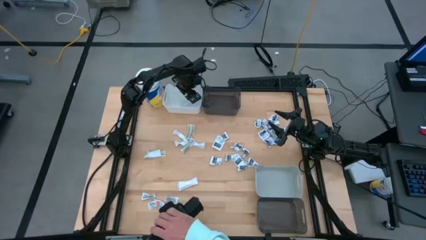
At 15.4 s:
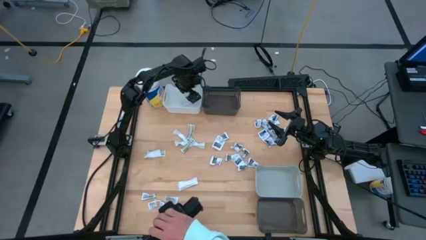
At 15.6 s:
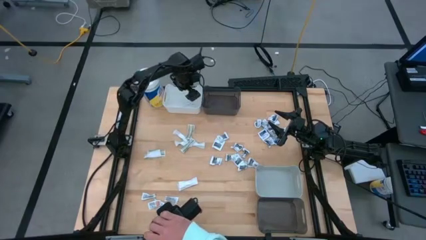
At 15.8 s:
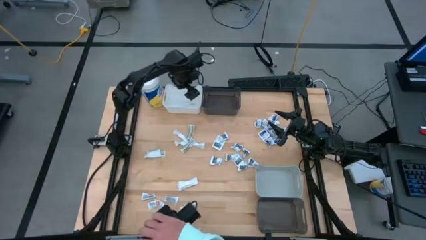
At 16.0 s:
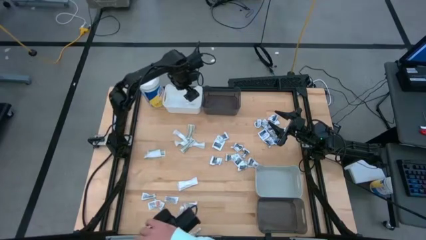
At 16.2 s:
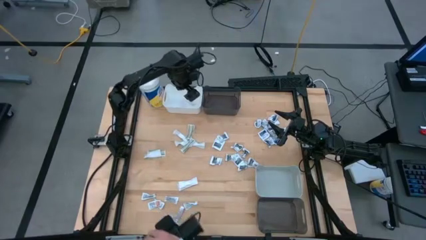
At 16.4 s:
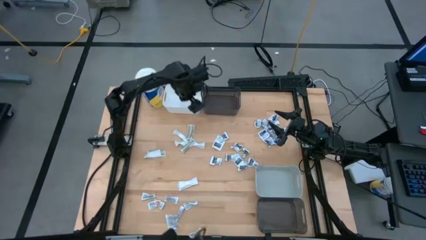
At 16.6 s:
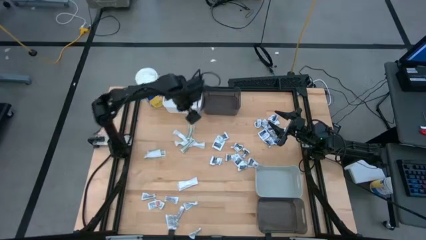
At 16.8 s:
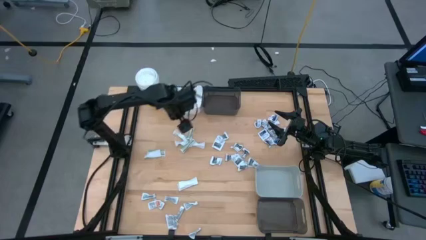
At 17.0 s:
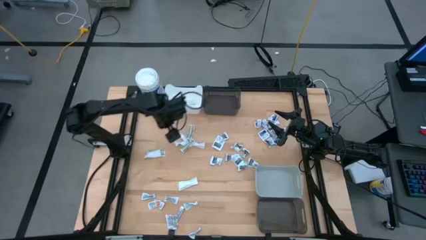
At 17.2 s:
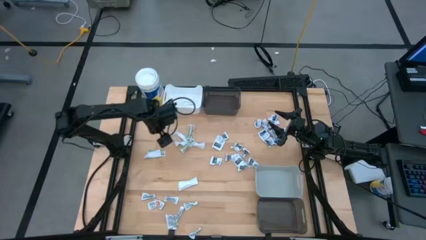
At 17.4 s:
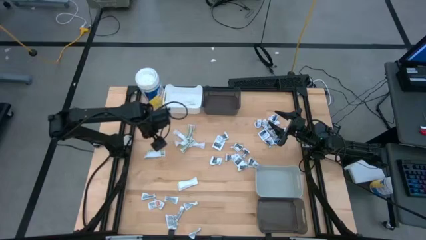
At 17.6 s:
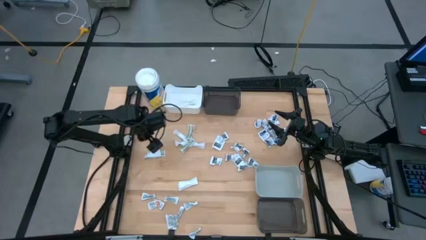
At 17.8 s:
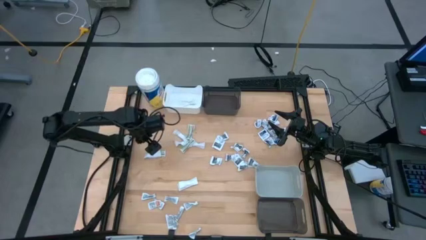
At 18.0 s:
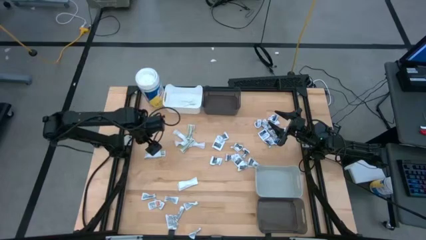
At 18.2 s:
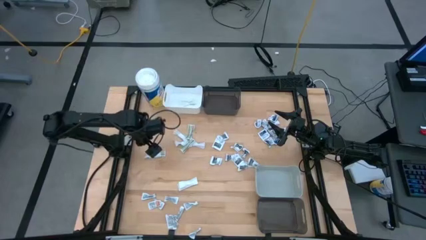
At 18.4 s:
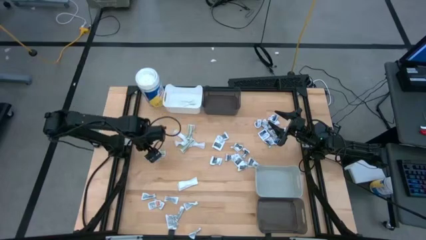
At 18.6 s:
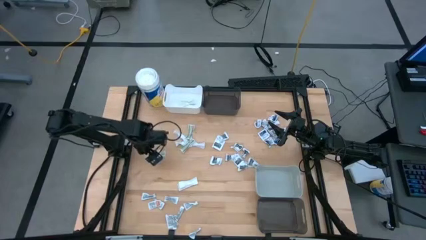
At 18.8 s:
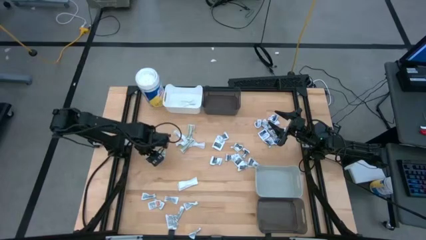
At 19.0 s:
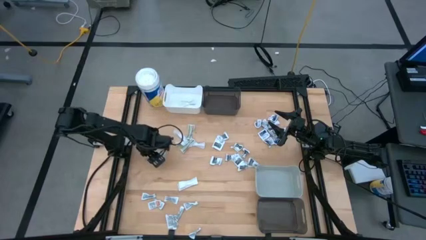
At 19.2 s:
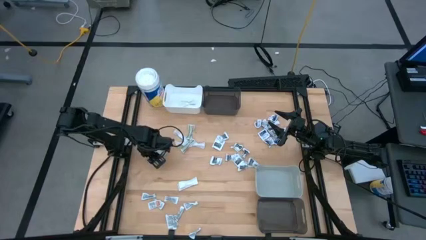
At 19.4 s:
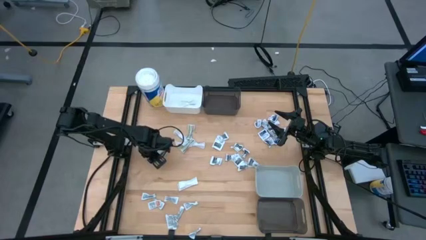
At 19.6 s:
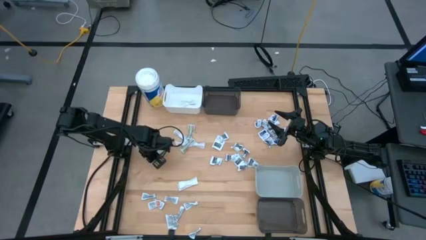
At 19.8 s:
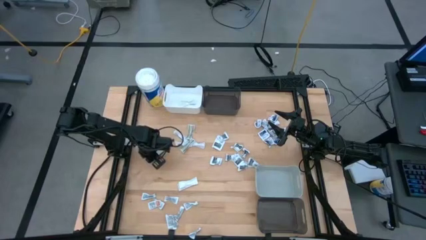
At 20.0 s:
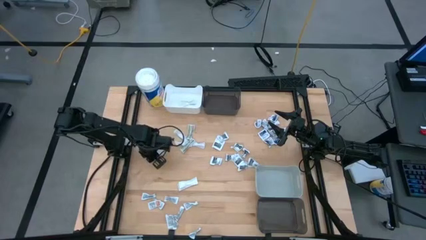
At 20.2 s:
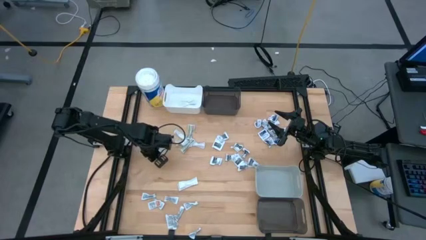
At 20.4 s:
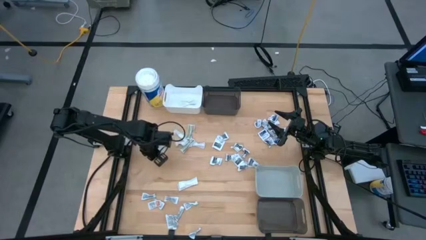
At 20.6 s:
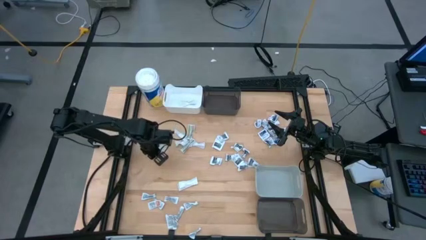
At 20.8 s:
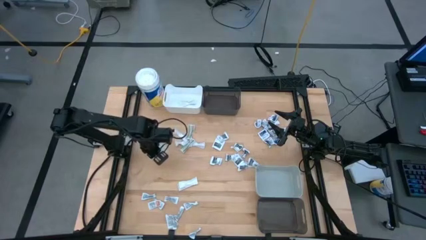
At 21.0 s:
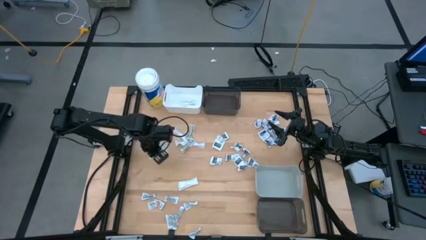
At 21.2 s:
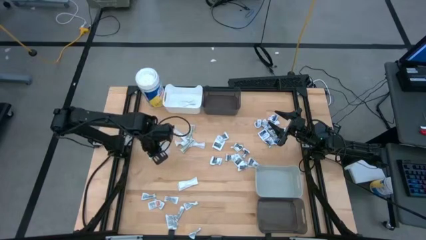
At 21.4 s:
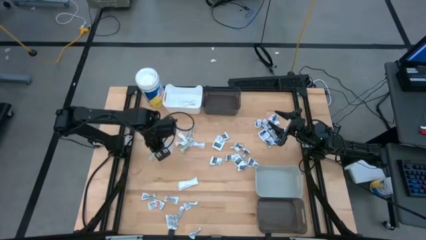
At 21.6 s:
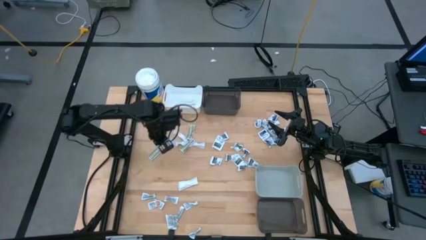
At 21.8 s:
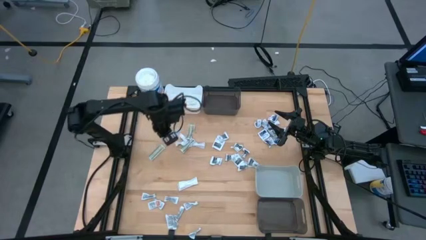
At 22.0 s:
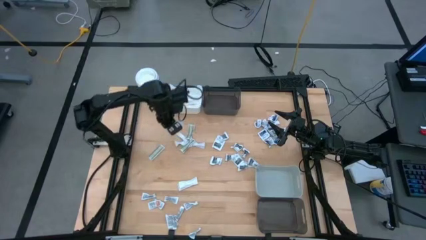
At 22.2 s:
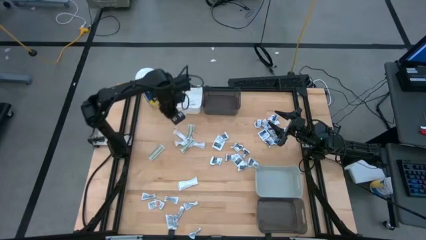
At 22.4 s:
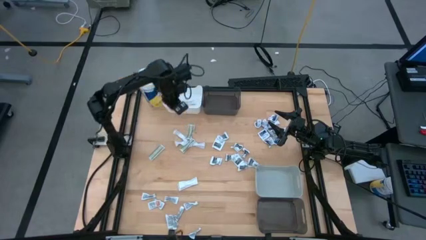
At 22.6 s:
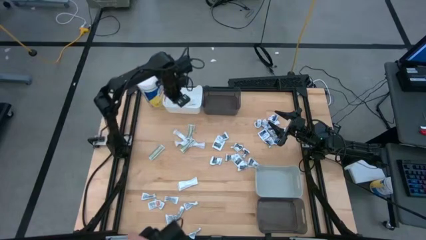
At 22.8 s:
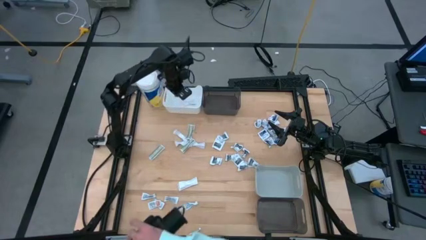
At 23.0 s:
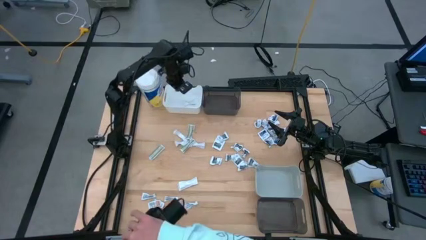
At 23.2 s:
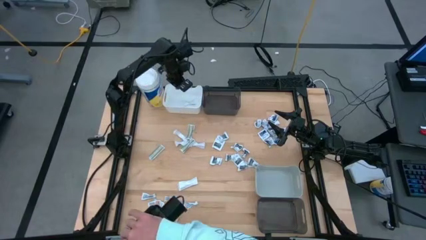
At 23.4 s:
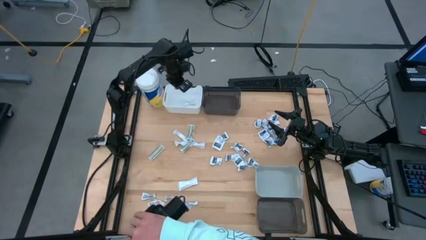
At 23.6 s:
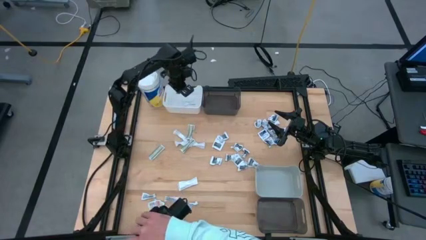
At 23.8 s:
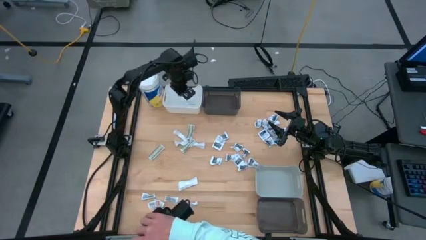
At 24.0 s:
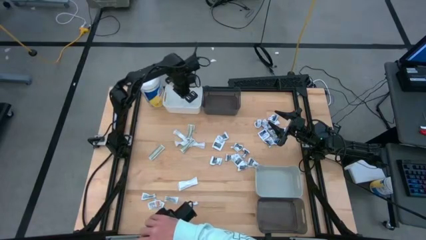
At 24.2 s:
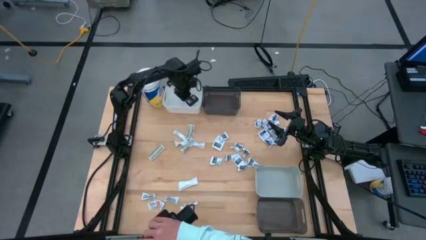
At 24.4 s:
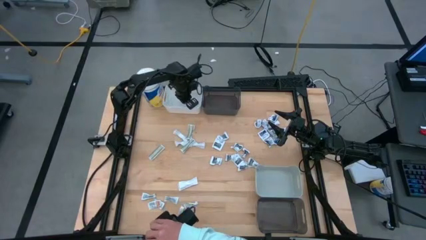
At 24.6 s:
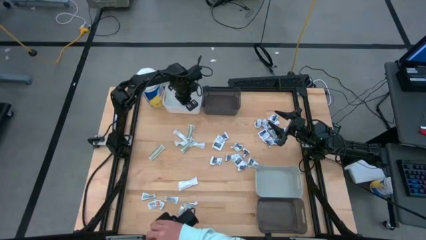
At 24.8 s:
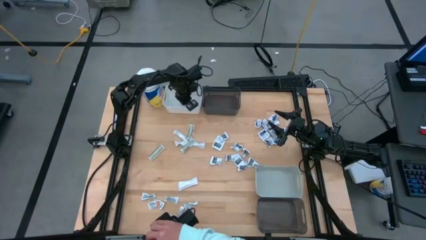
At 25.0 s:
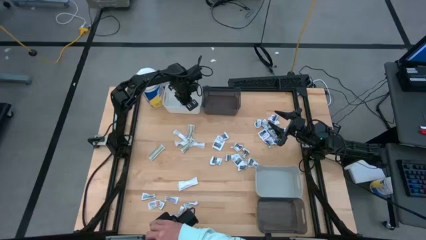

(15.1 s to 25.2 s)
Task: Pick & Place First Aid Supplies
Put the green bandage into the white bin

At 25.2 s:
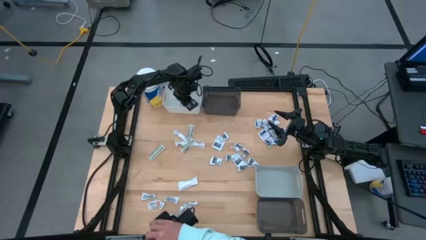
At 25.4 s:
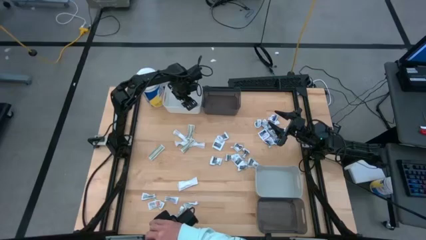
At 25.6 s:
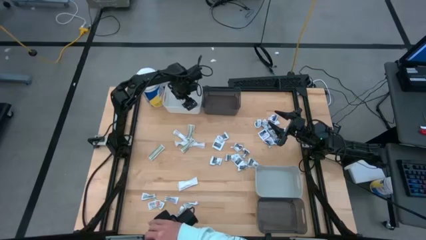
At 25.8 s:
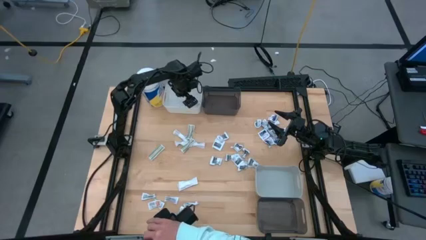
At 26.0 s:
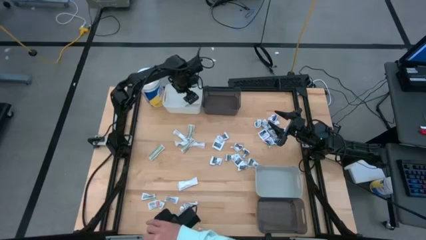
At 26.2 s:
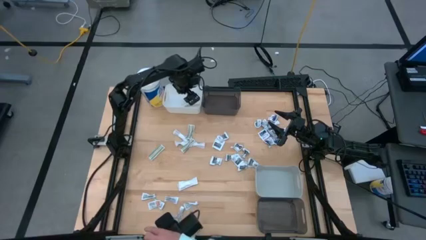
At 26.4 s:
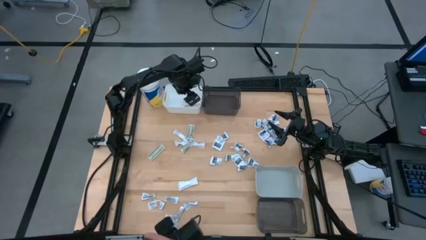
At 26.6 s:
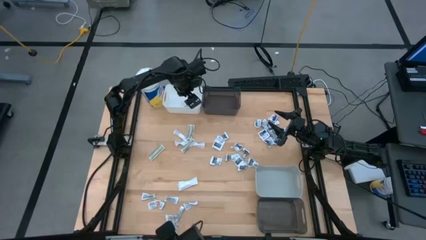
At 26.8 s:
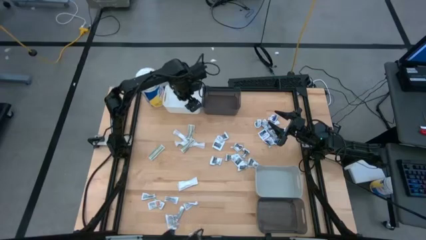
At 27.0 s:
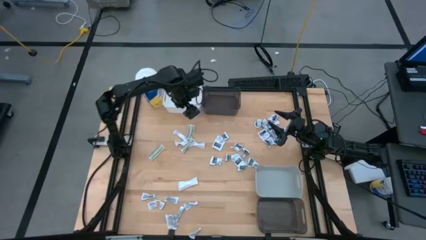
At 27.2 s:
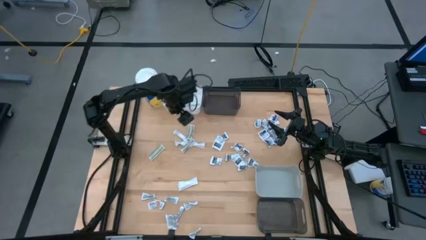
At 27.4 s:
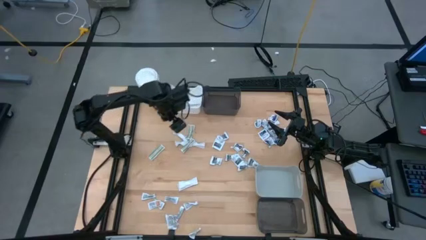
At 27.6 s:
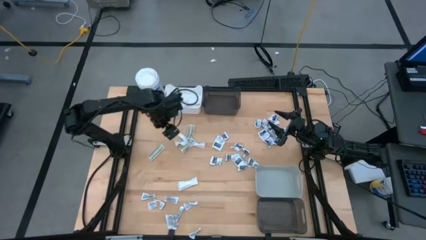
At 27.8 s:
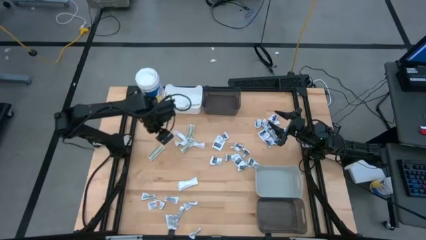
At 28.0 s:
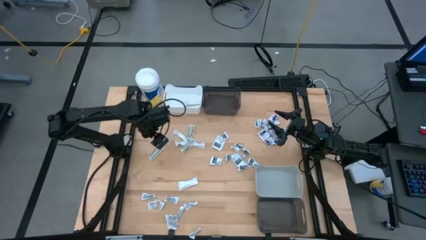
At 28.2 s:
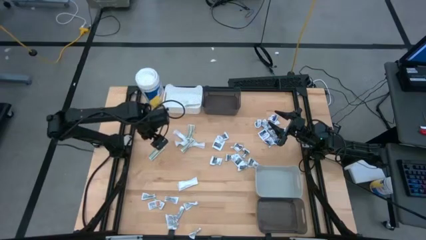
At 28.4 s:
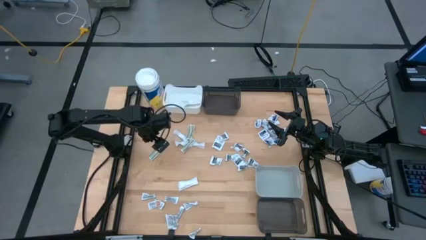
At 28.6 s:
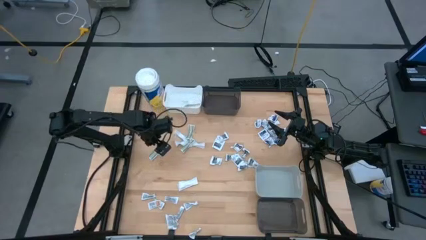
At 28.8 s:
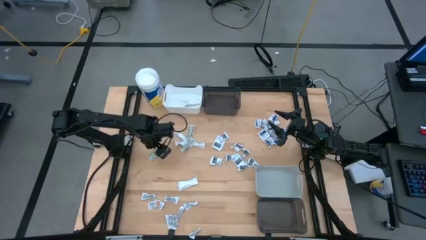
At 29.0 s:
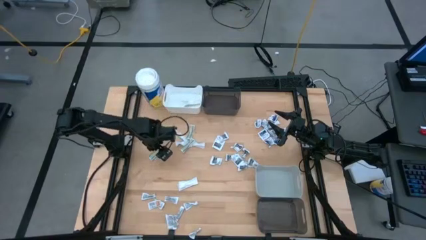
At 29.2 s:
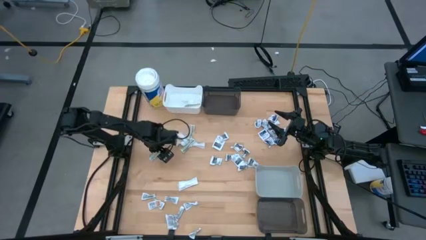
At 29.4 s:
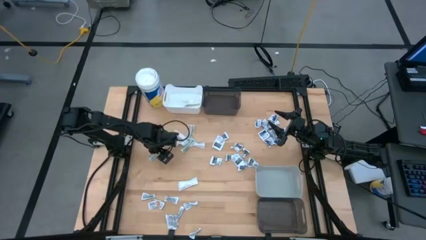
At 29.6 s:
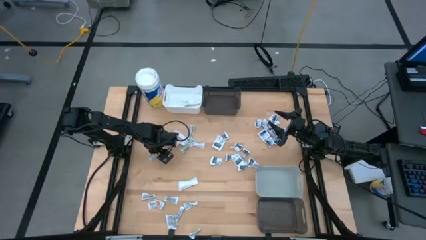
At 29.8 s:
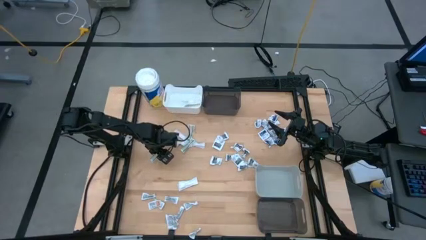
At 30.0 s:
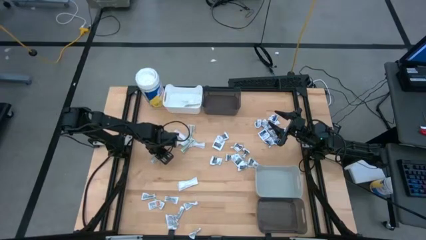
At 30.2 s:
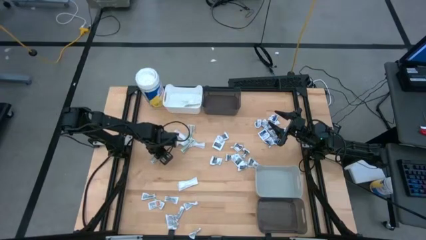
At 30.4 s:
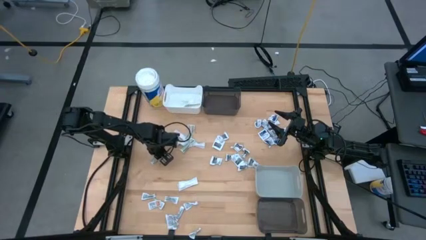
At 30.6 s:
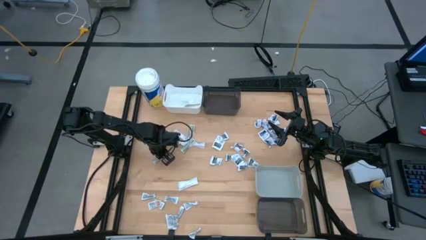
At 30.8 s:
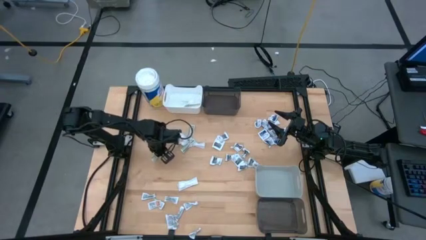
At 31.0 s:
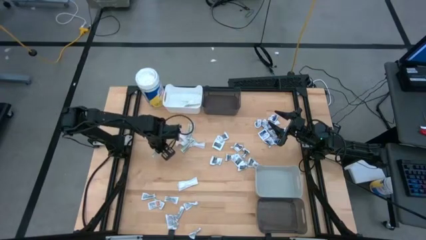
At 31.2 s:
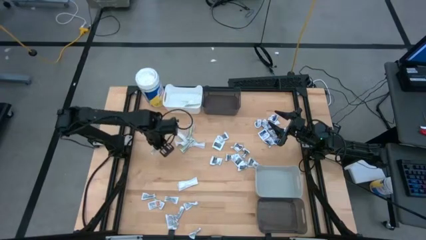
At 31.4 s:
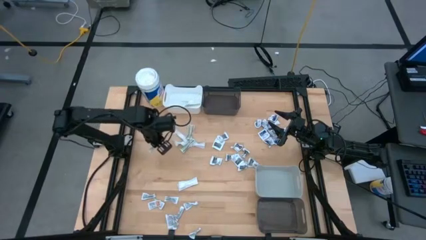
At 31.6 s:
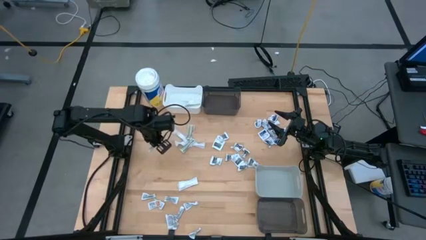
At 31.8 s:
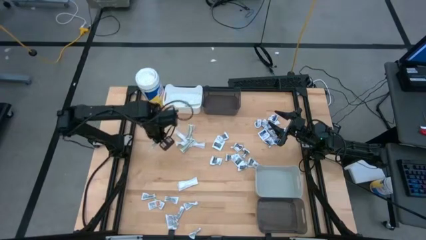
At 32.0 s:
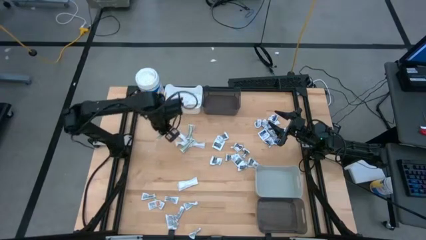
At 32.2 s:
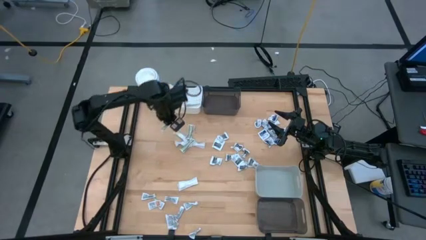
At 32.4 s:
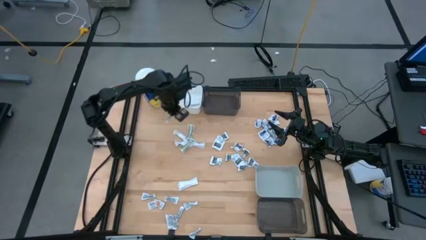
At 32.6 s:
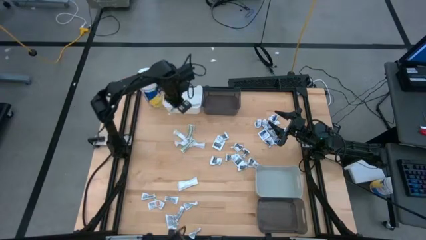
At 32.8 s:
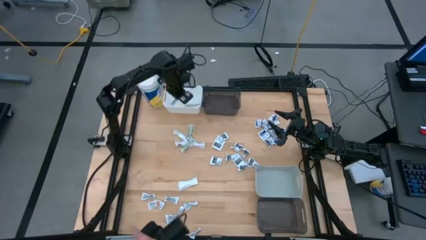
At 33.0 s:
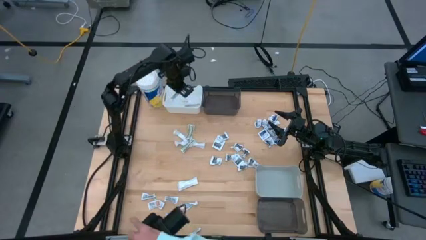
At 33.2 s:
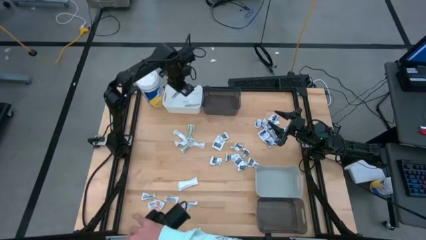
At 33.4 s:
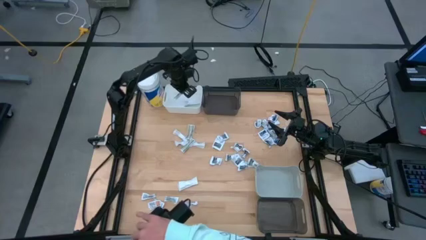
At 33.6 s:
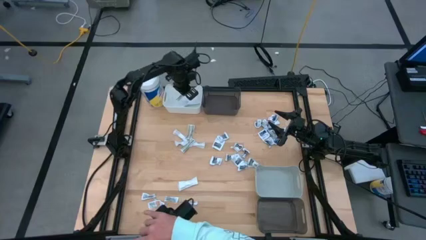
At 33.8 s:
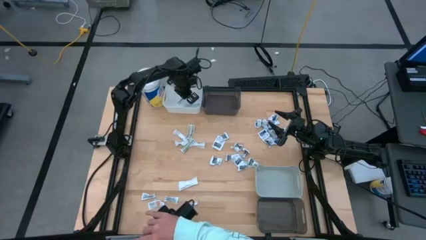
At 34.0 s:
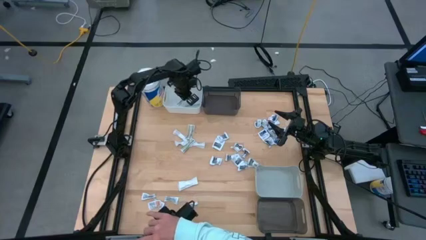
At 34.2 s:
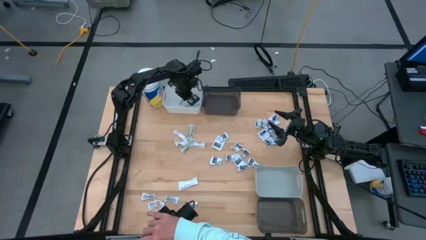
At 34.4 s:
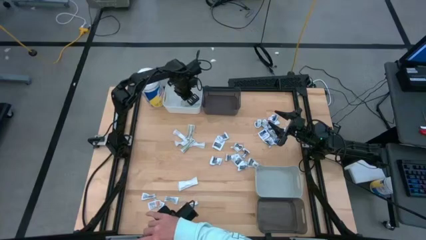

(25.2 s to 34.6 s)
Put the green bandage into the white bin
